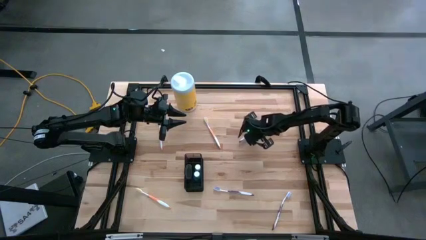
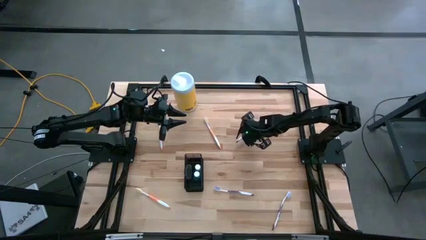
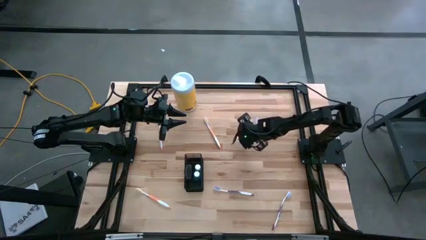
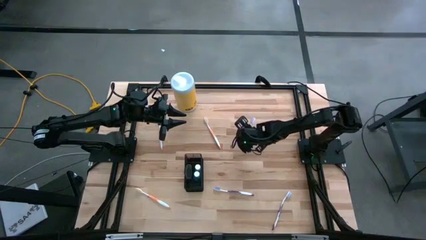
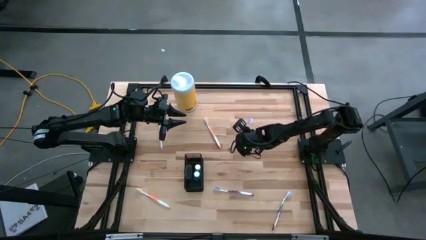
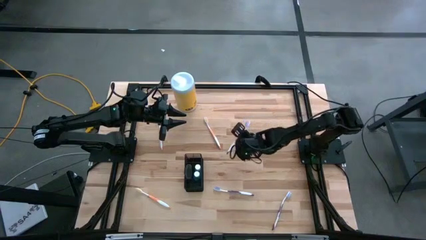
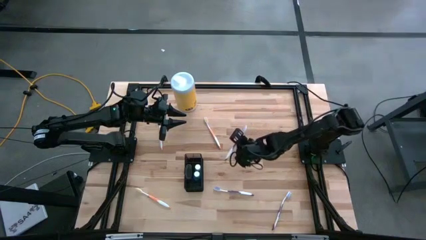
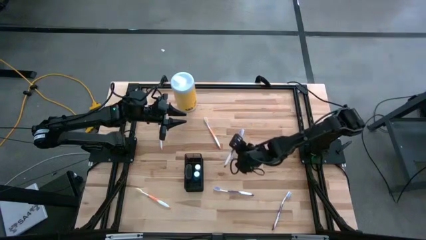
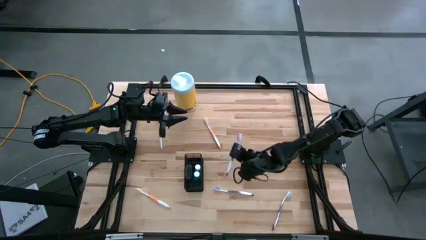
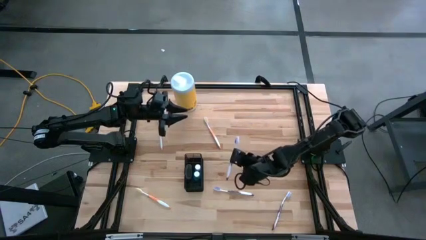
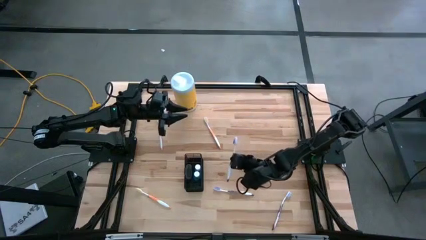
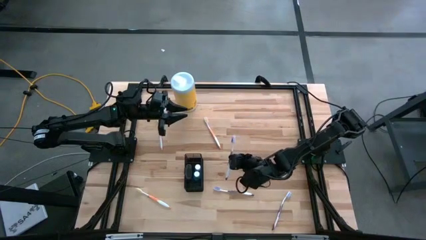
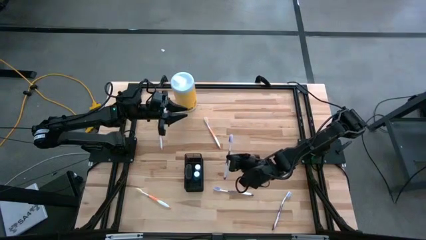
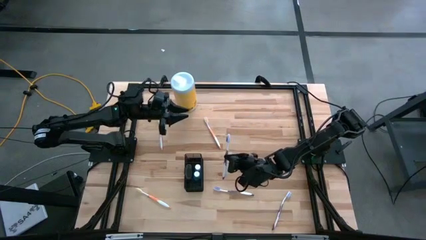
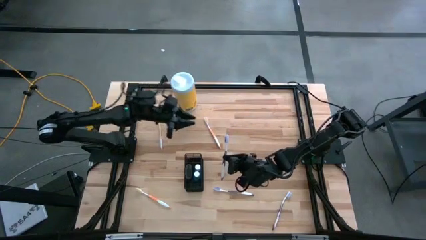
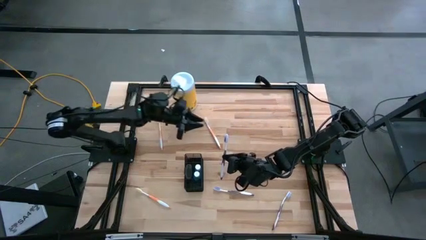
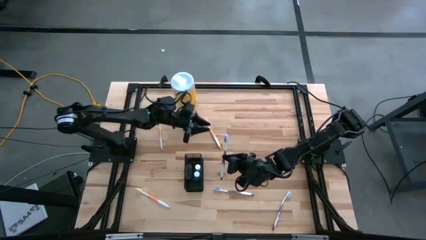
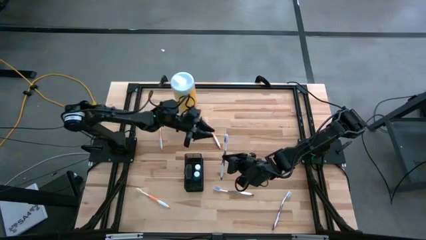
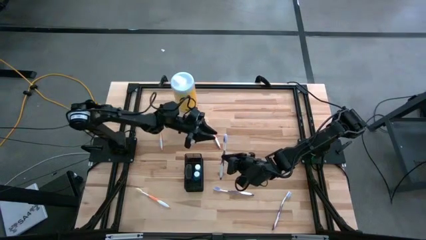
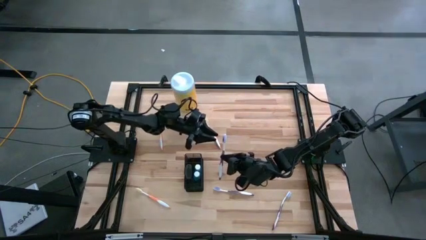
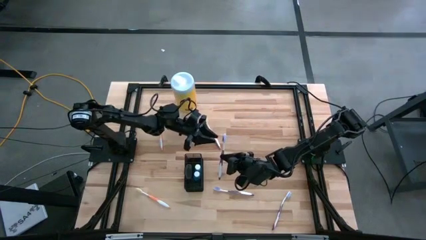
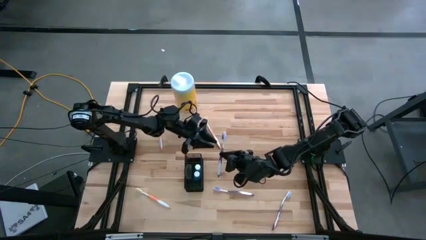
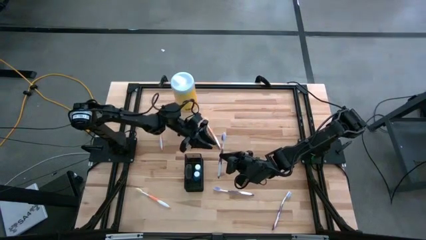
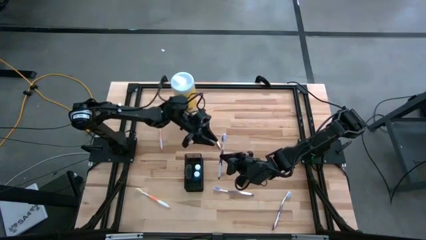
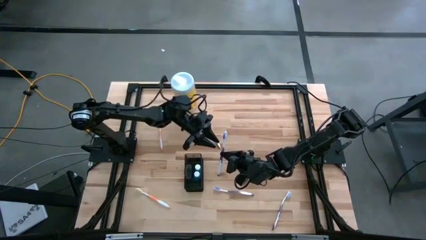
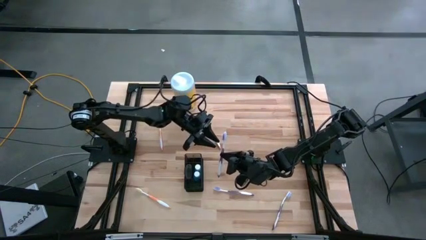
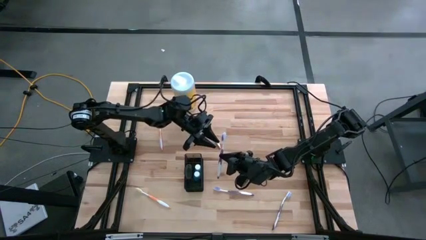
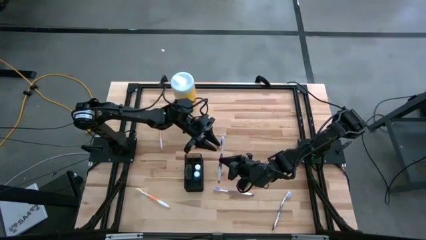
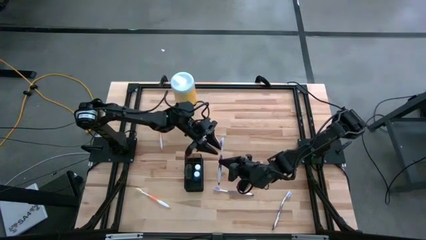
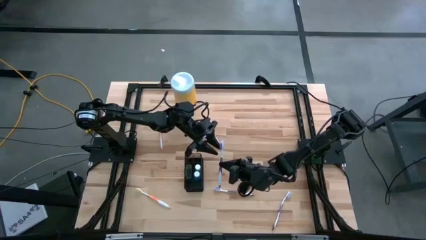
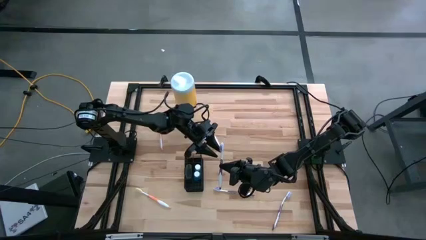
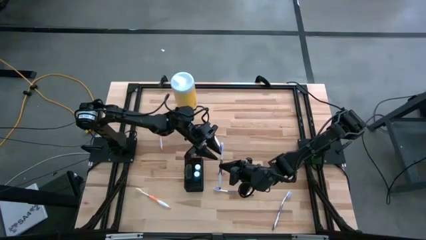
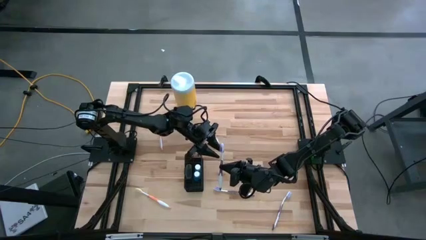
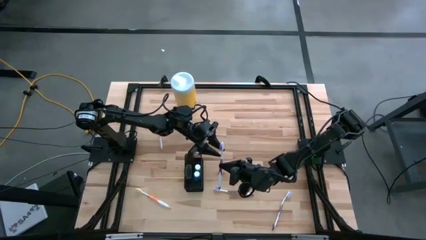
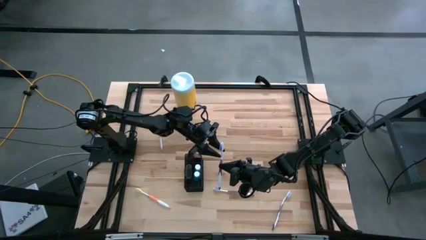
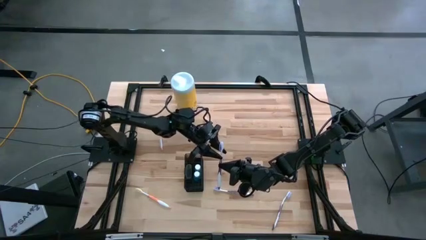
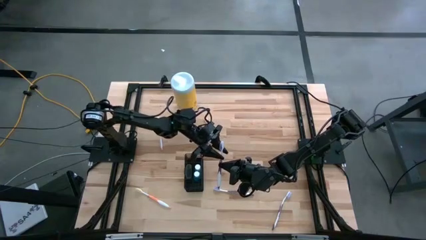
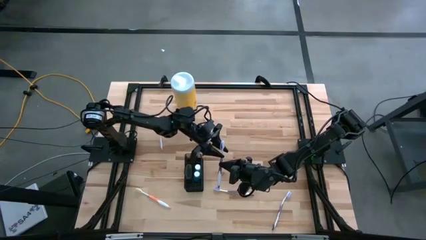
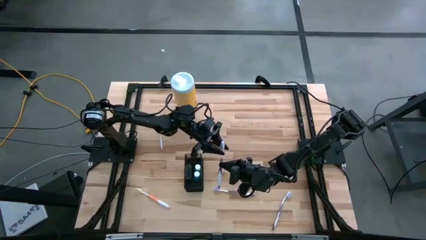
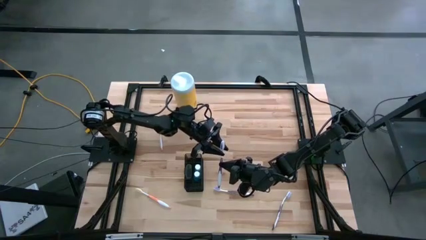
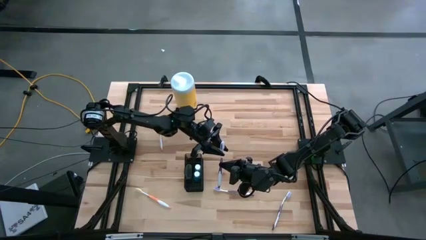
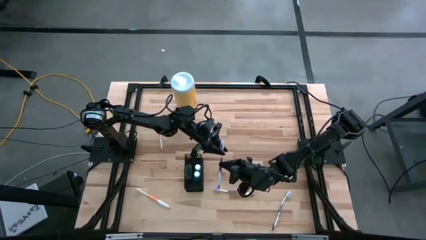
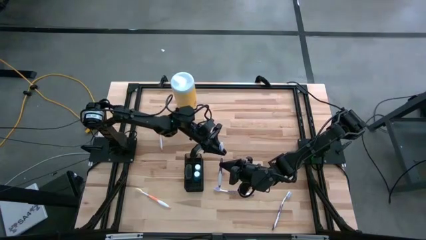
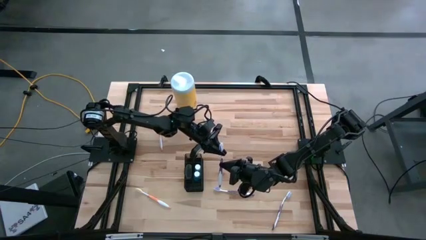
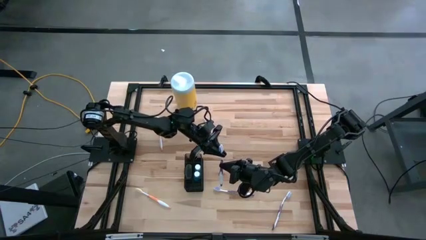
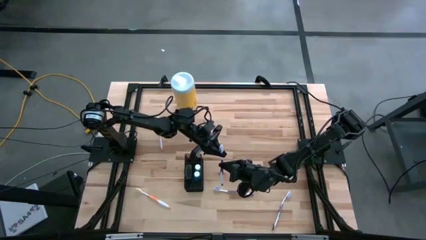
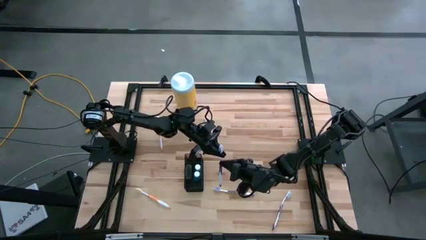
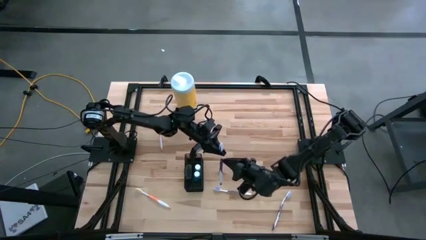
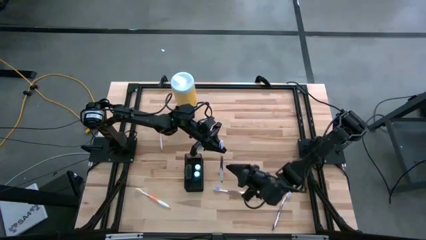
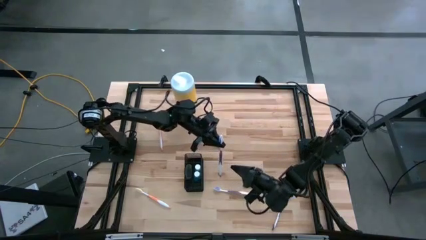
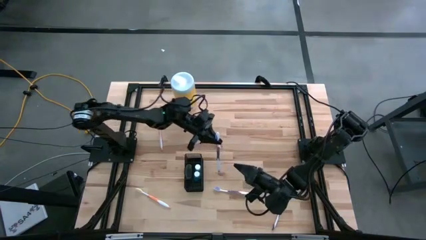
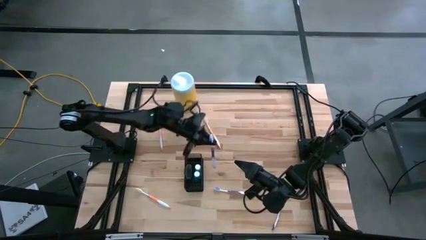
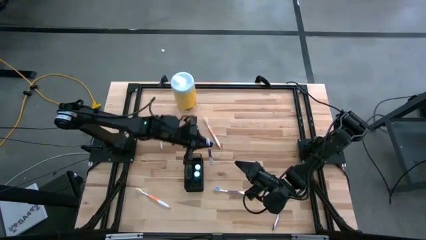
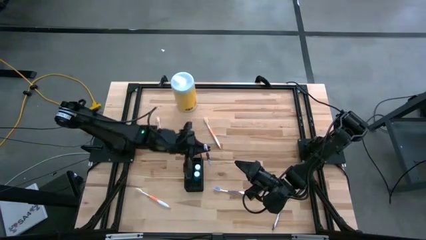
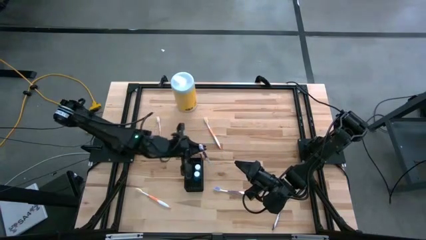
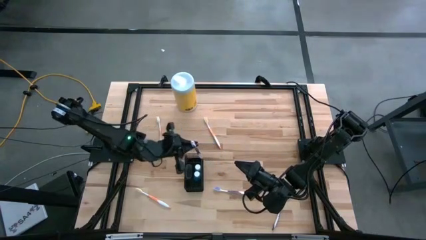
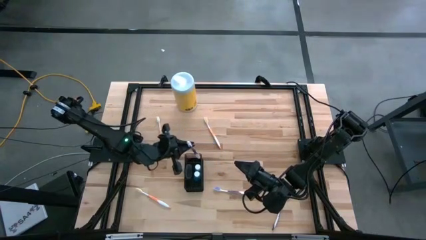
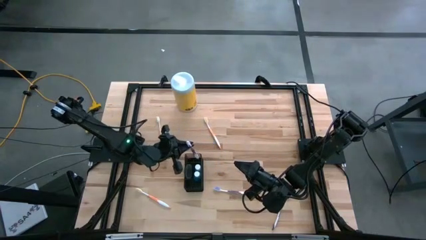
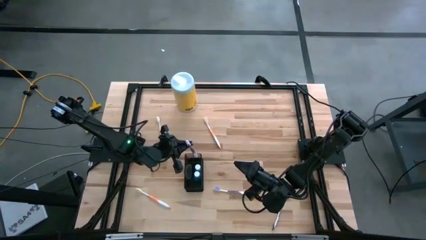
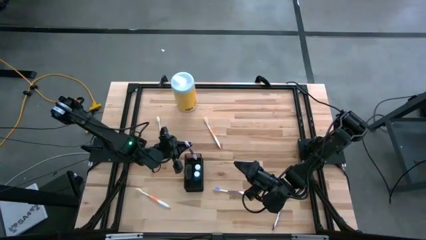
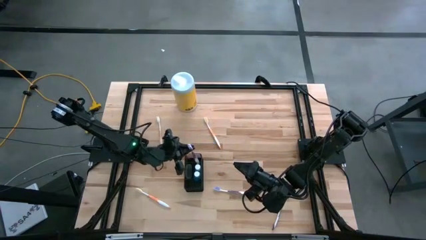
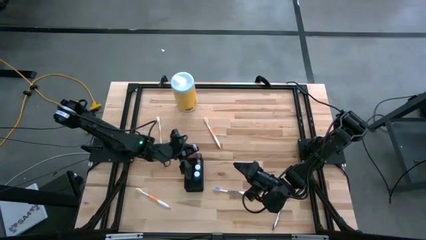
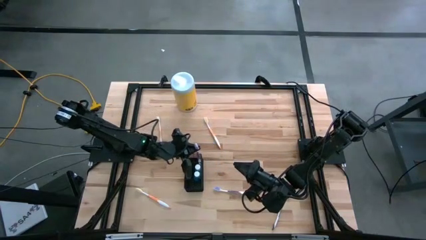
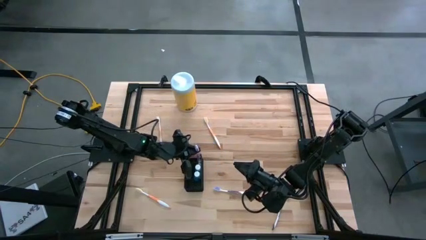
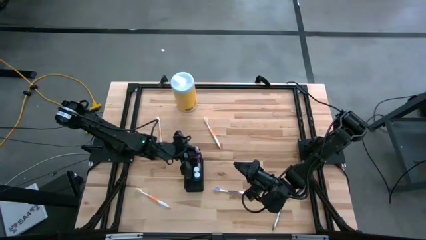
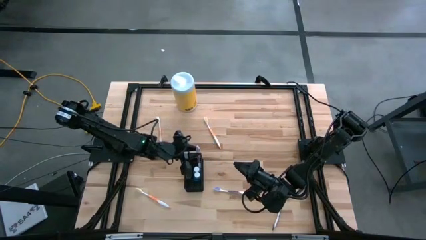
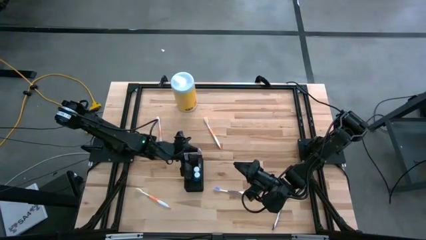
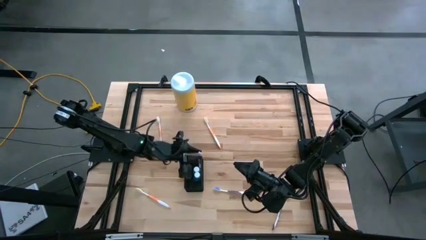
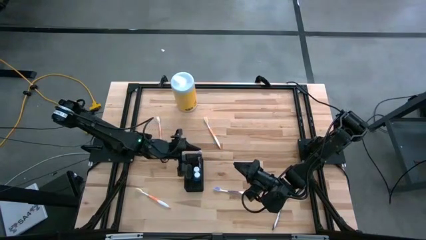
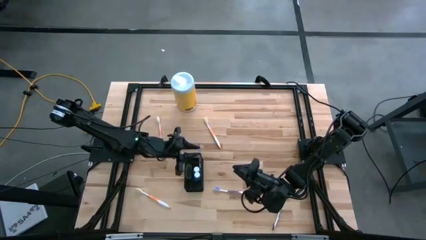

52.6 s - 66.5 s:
Task: Pick & Place toothbrushing station
Put the top purple toothbrush into the top section of the black wire organizer
